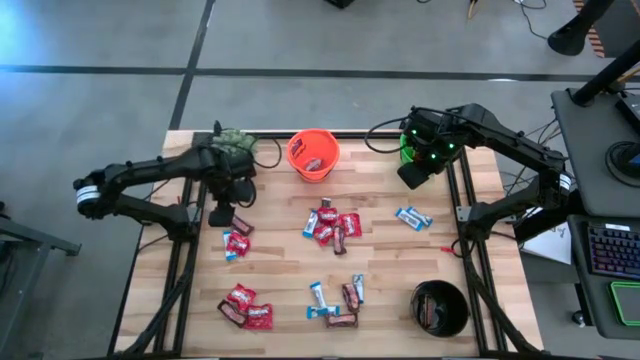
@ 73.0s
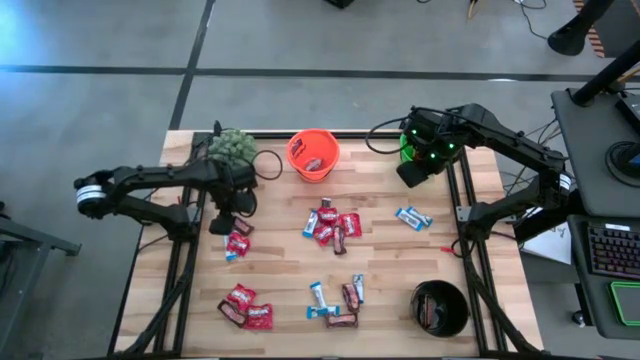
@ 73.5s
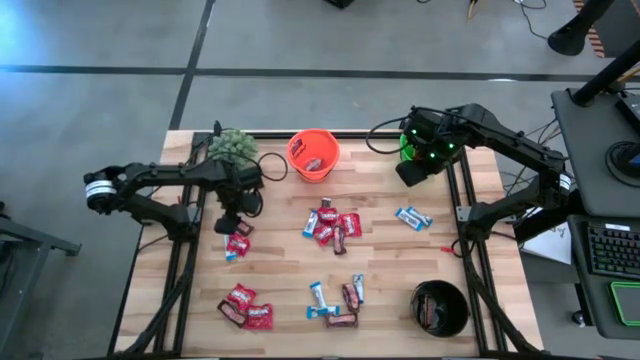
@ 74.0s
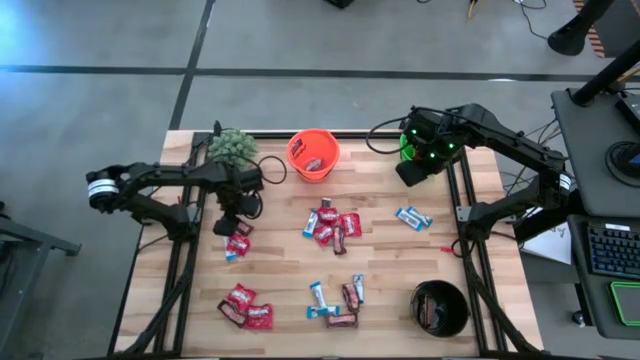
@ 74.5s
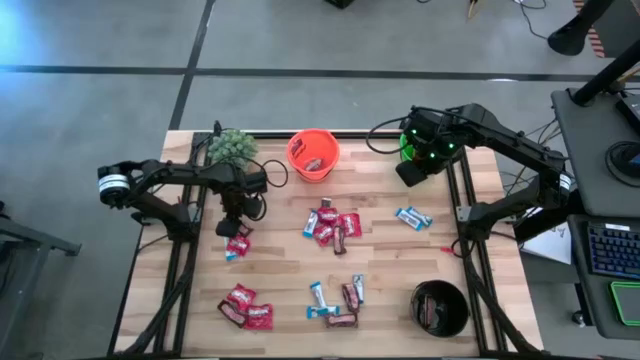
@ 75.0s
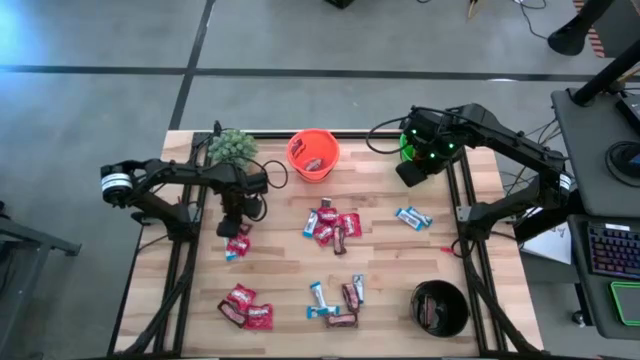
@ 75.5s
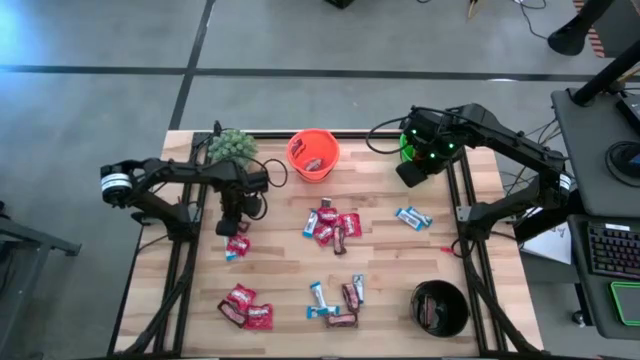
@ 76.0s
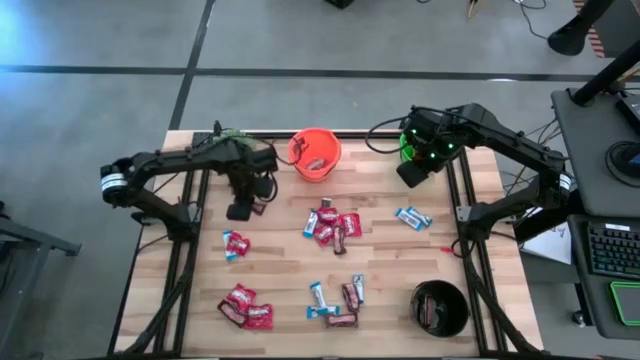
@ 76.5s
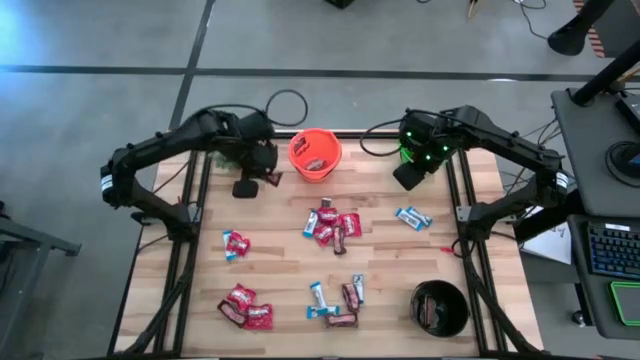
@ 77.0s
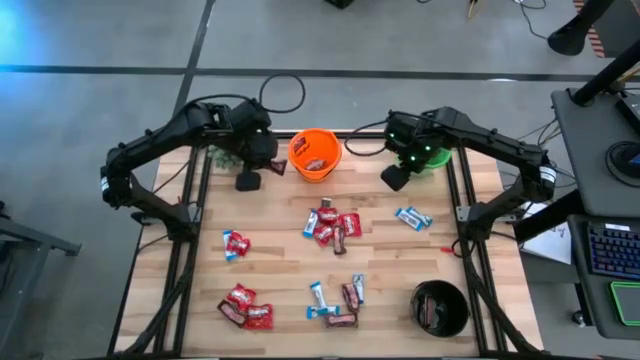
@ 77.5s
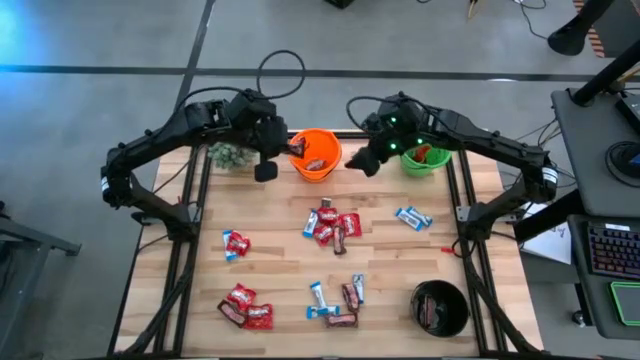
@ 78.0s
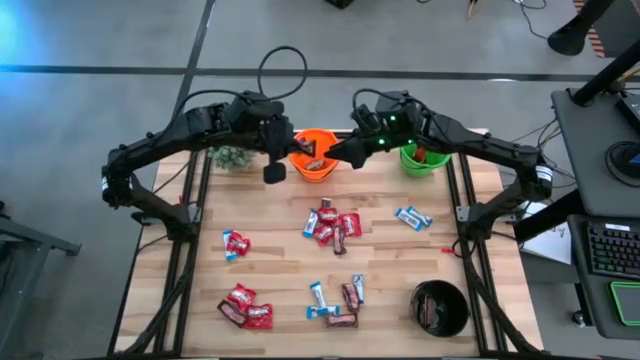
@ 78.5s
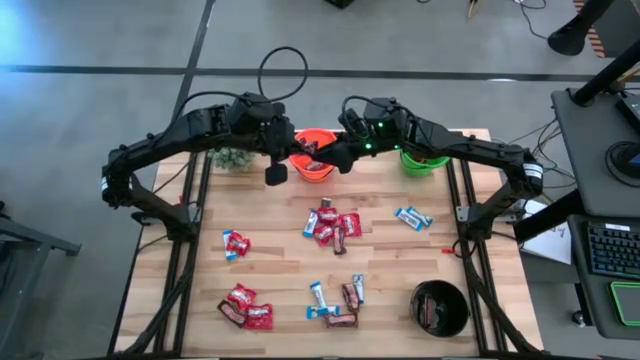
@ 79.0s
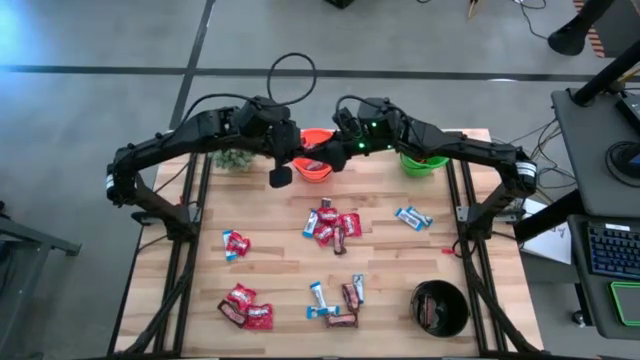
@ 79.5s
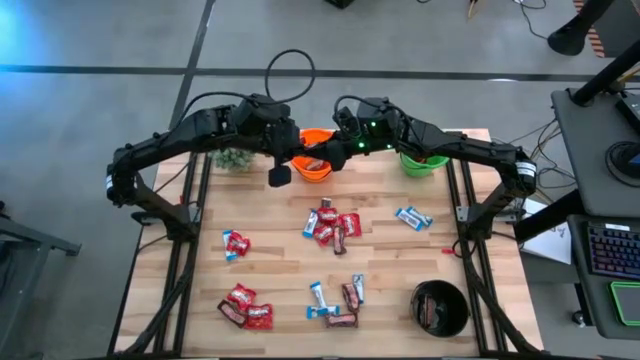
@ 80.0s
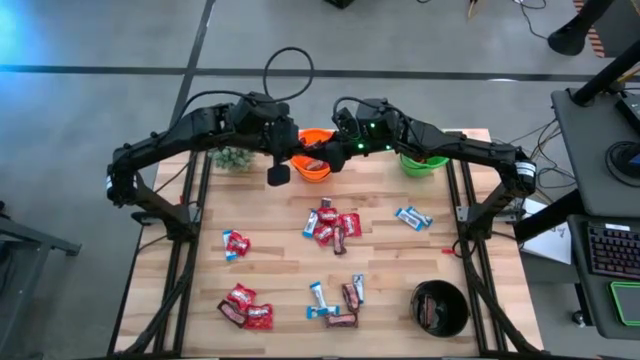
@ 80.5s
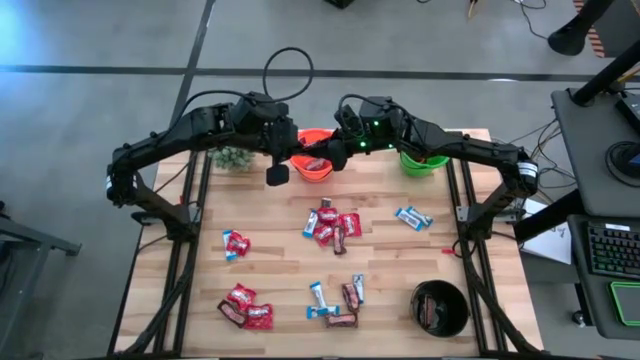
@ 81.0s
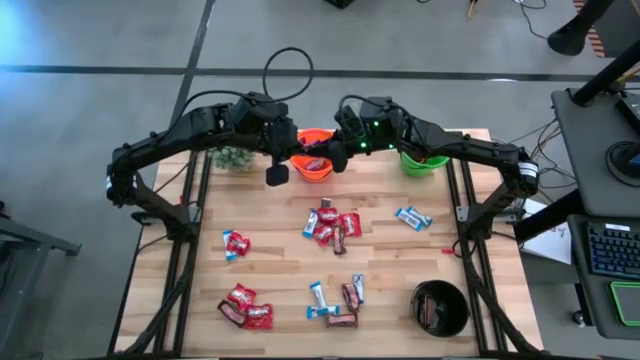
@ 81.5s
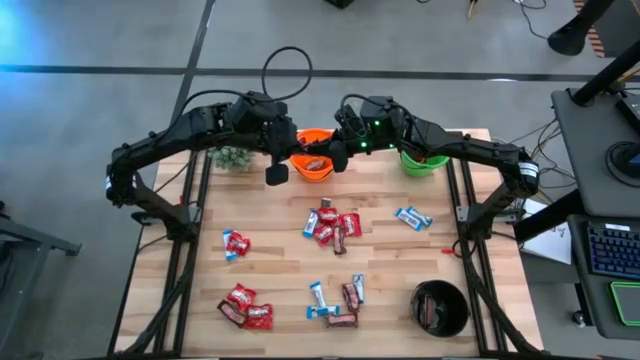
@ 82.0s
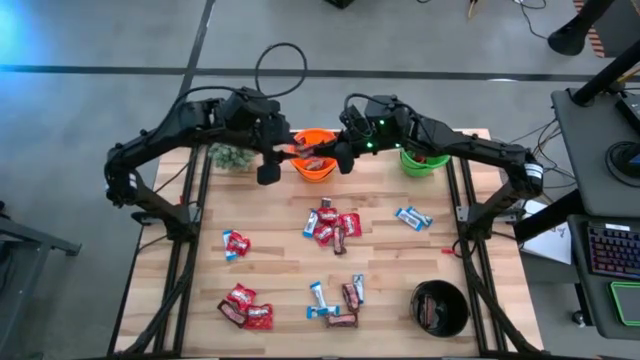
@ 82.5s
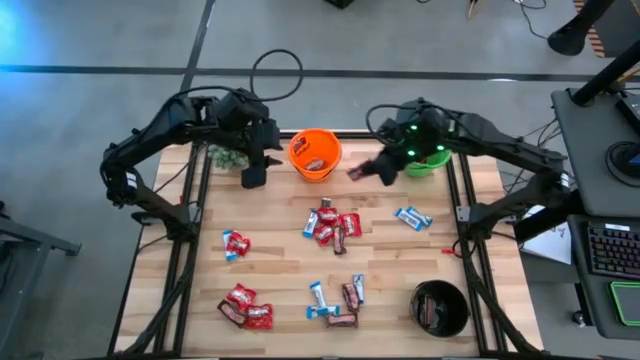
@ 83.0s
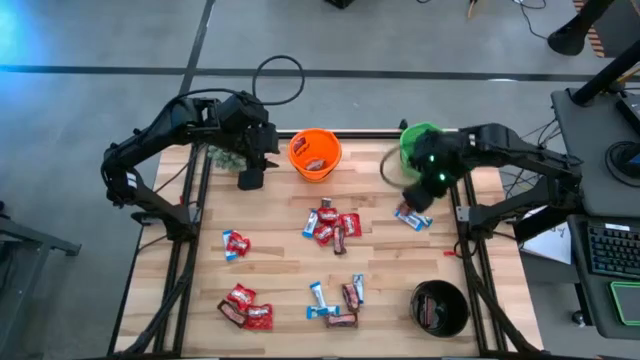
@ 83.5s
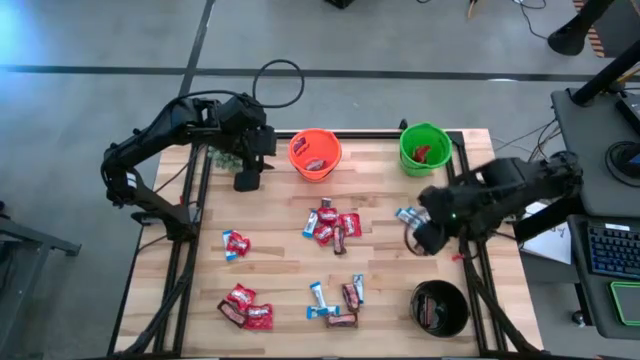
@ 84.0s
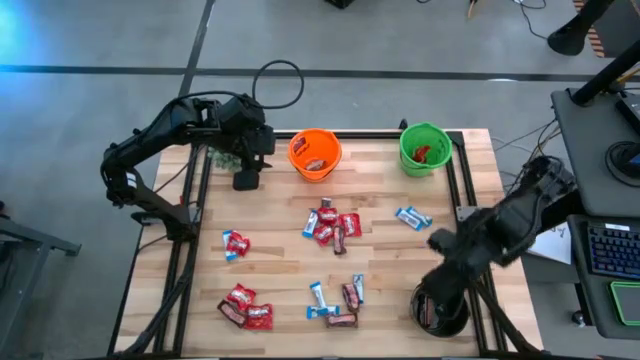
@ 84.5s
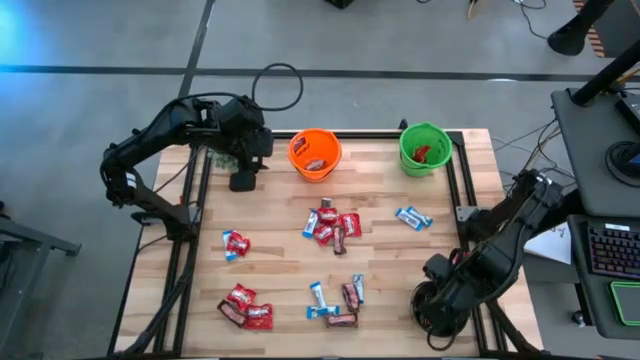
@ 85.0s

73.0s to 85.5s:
Task: Sort candy
Put the brown chocolate into the black bucket

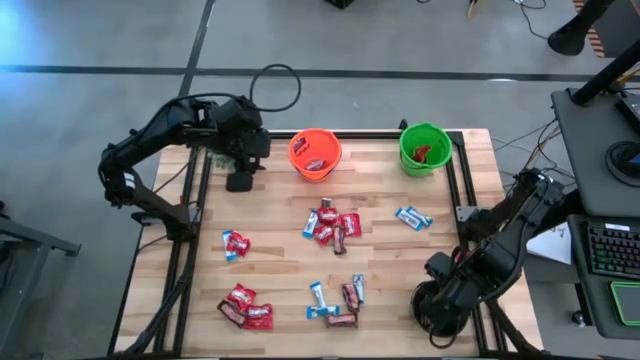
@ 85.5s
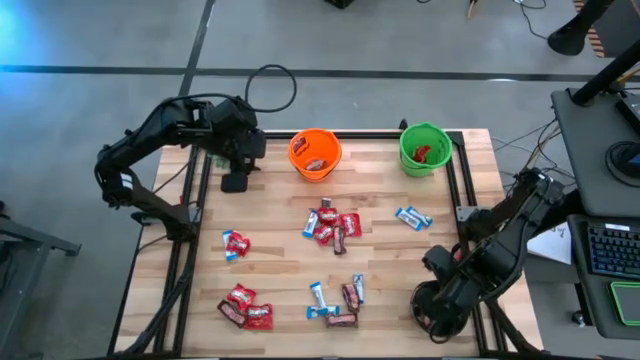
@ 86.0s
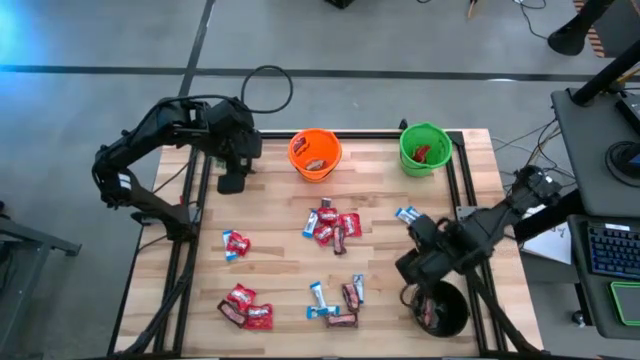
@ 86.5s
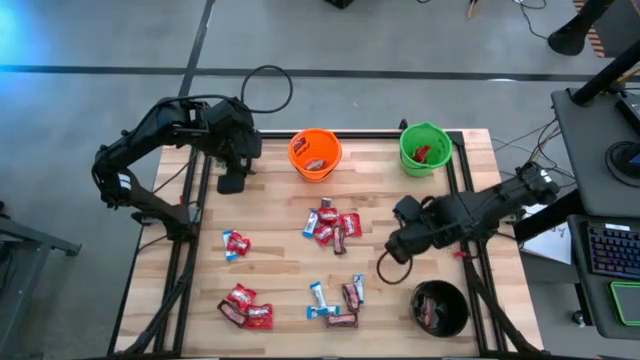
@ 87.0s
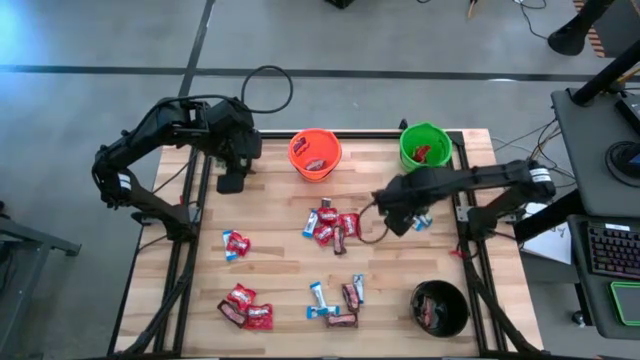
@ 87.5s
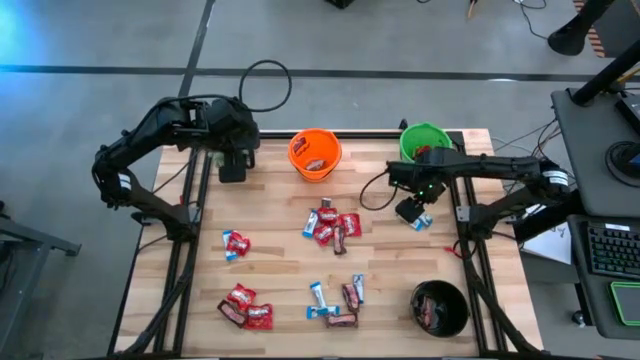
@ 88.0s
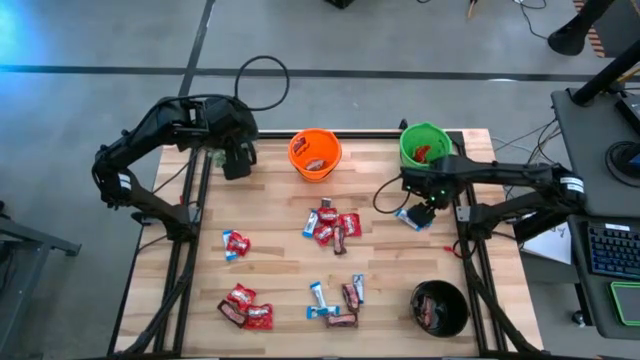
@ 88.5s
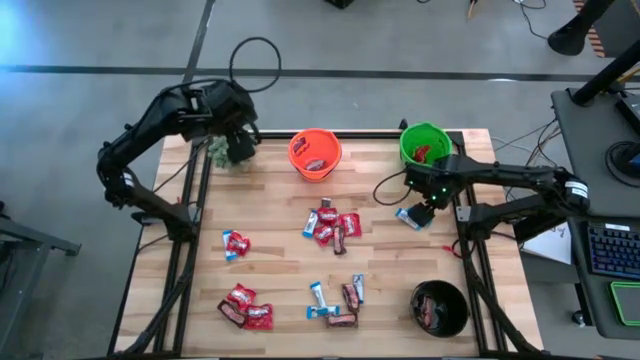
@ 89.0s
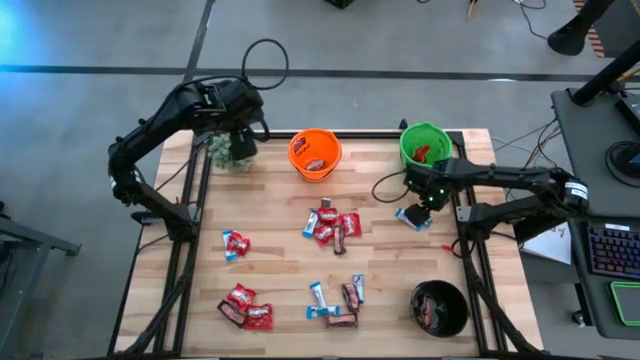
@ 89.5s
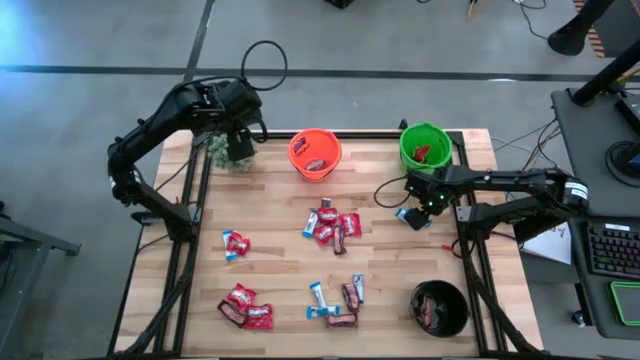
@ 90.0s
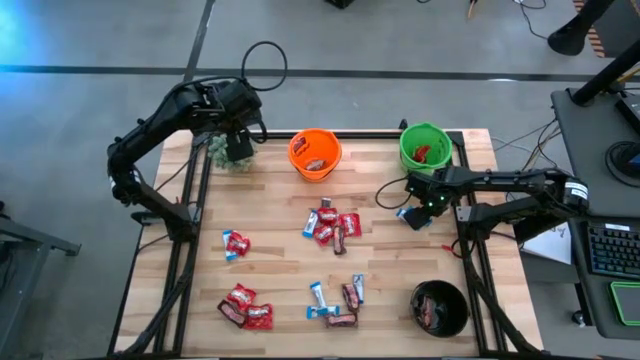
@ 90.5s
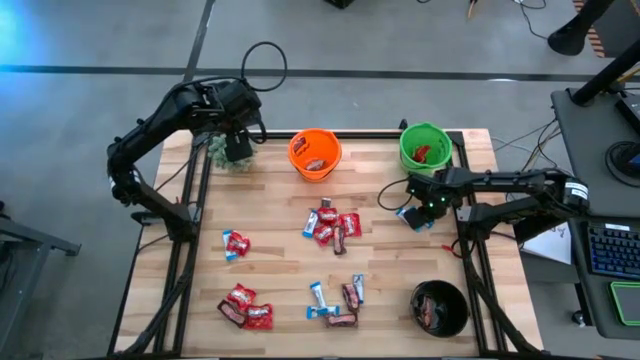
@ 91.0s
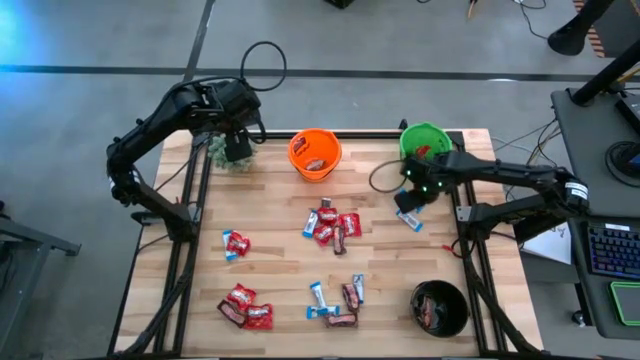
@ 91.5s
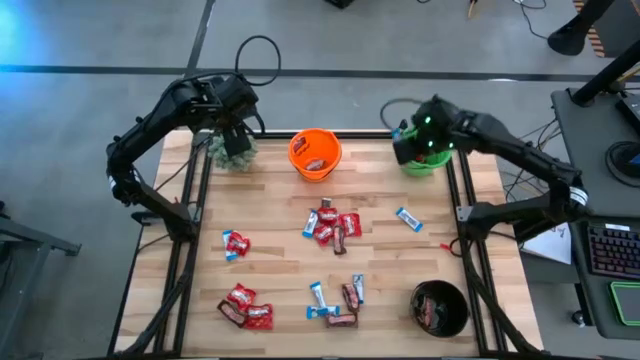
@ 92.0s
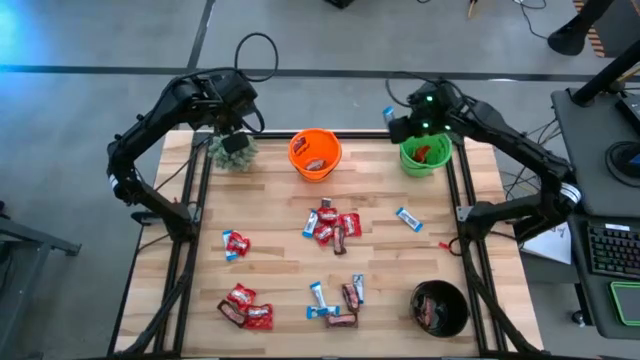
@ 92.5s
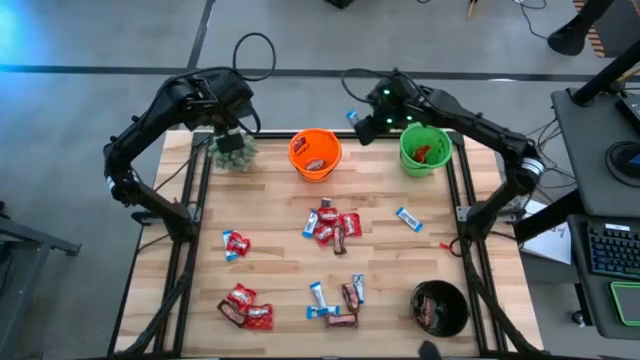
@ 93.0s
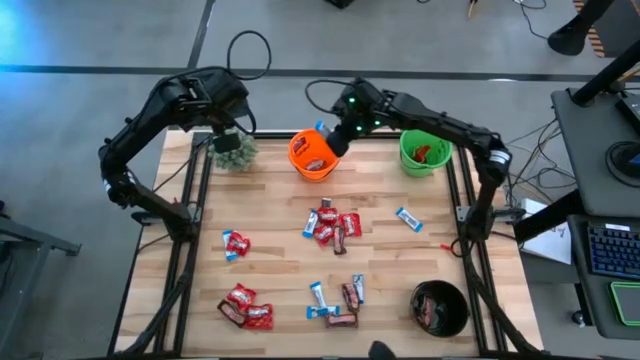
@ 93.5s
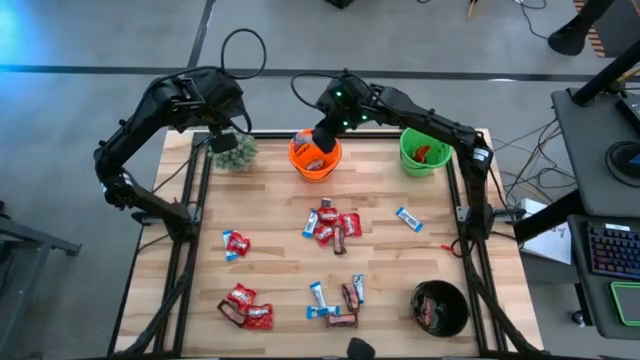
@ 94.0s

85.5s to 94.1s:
Put the white chocolate into the orange bucket

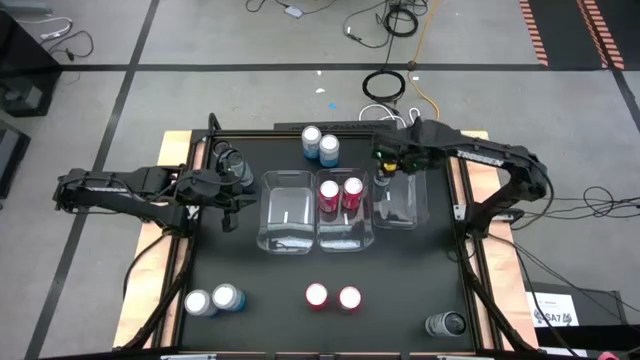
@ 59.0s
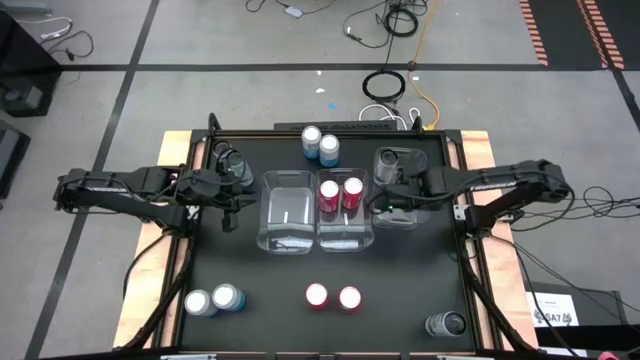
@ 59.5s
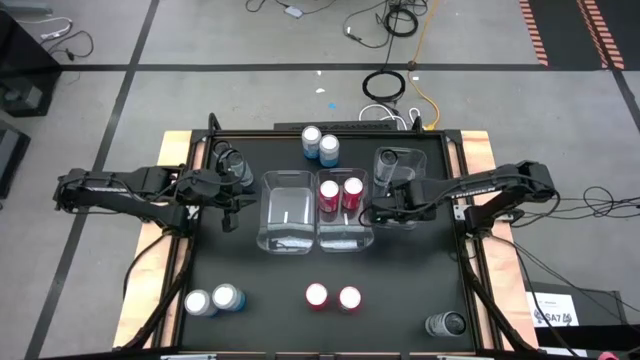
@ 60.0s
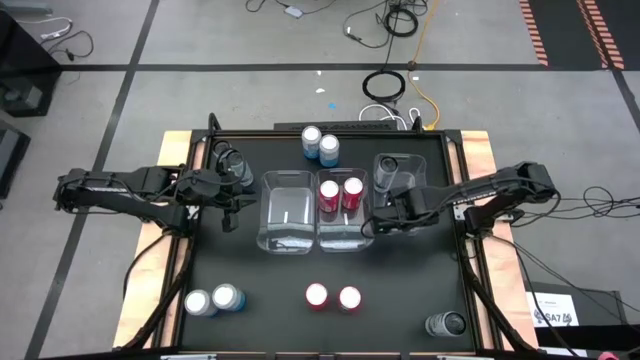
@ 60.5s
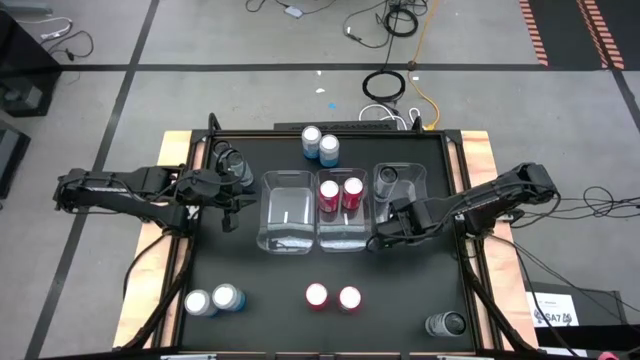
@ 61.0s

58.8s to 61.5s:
Task: Sort soda cans
Adjust the right transparent bin
